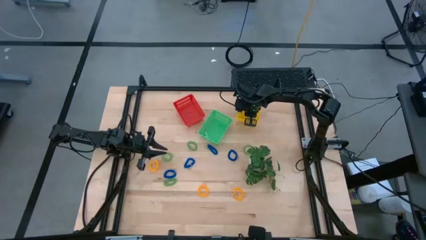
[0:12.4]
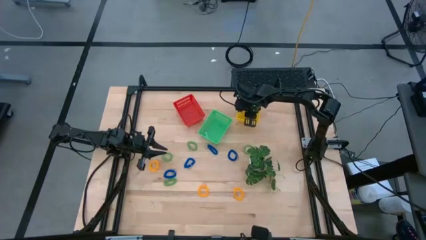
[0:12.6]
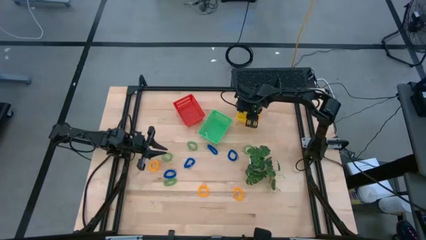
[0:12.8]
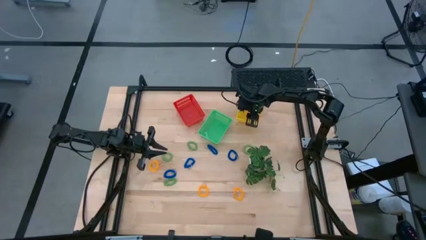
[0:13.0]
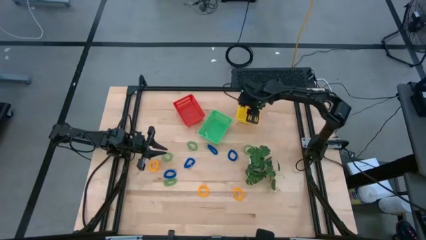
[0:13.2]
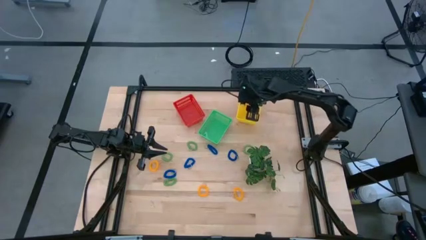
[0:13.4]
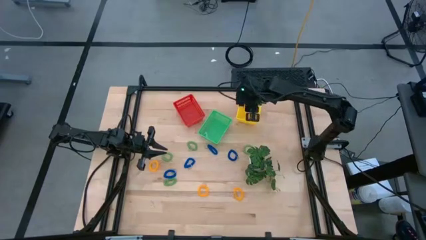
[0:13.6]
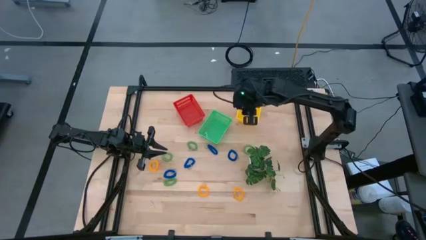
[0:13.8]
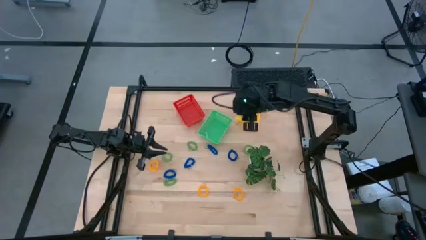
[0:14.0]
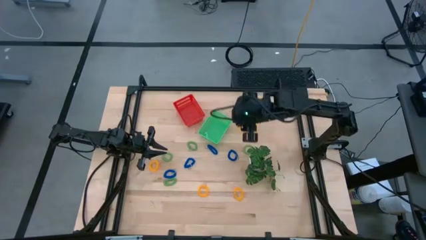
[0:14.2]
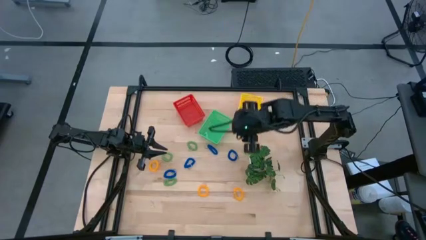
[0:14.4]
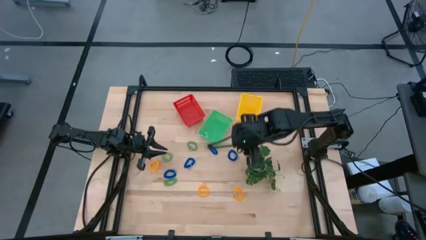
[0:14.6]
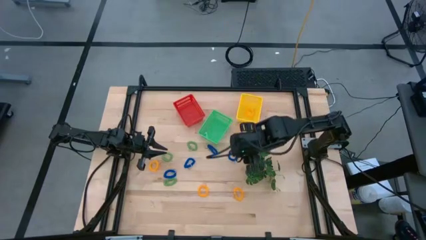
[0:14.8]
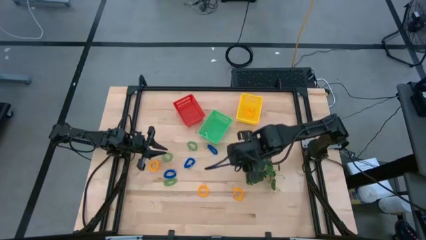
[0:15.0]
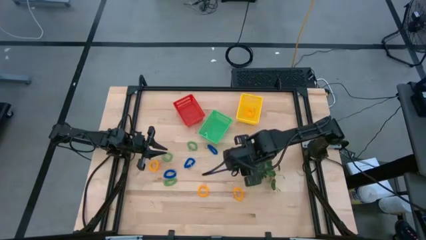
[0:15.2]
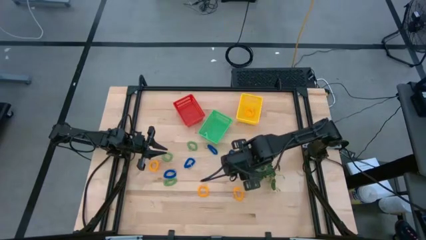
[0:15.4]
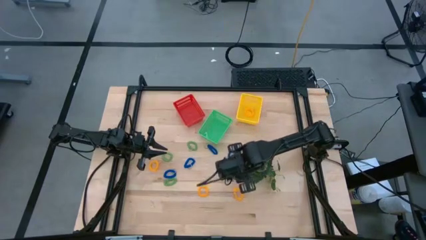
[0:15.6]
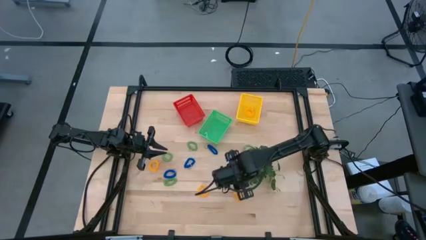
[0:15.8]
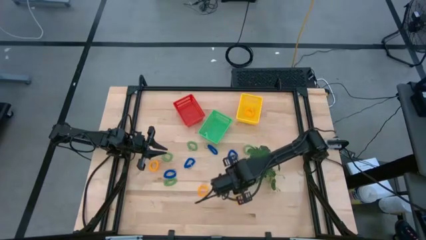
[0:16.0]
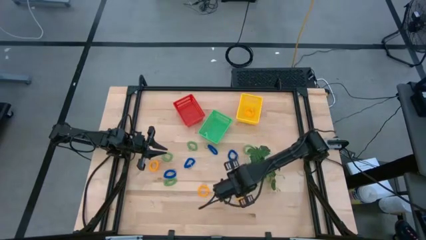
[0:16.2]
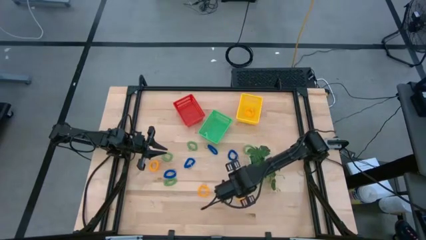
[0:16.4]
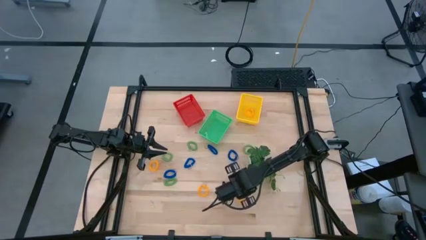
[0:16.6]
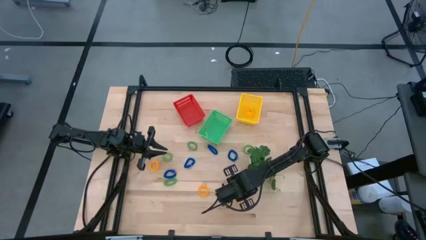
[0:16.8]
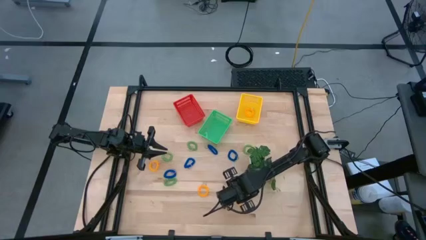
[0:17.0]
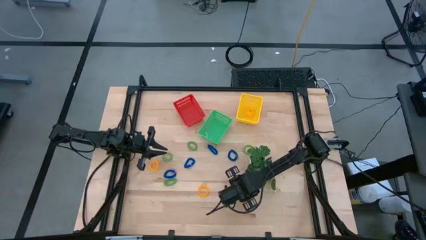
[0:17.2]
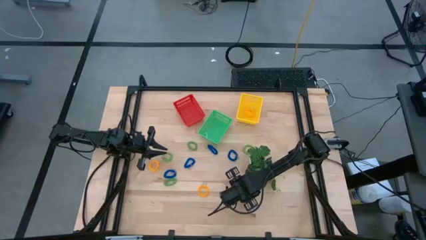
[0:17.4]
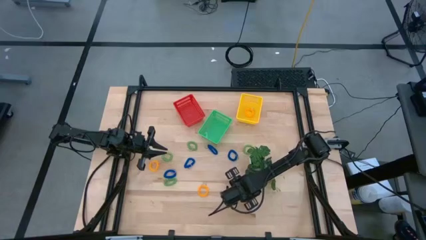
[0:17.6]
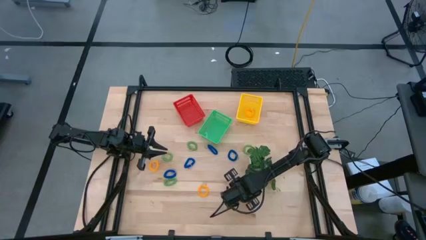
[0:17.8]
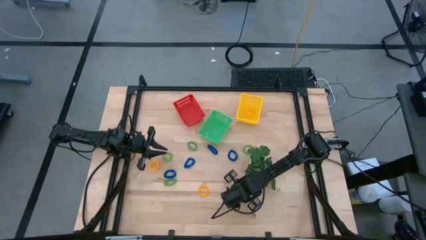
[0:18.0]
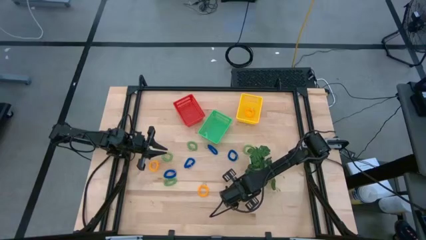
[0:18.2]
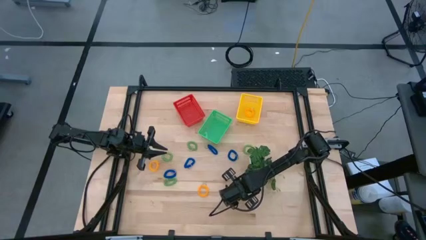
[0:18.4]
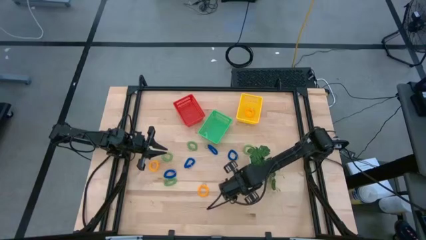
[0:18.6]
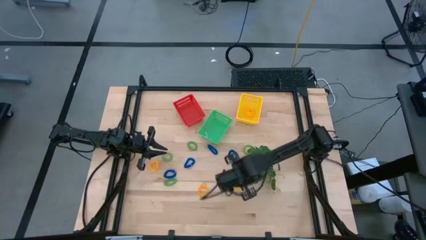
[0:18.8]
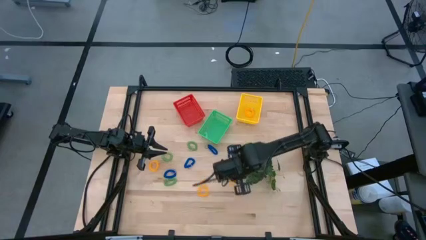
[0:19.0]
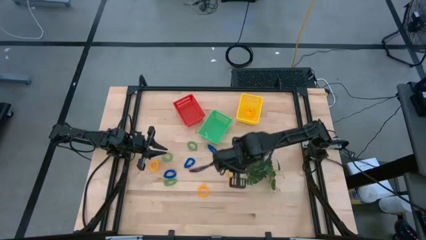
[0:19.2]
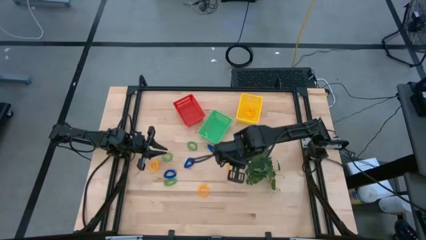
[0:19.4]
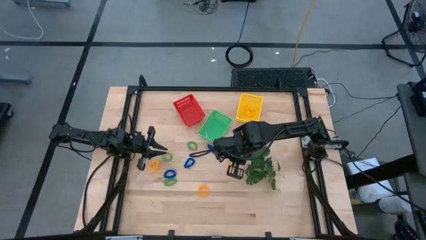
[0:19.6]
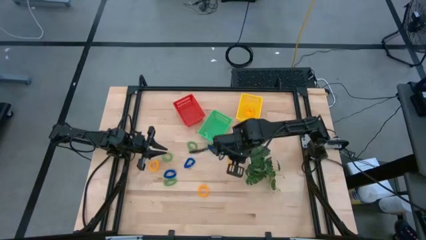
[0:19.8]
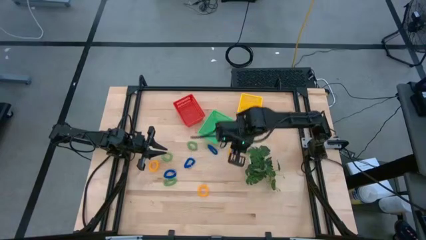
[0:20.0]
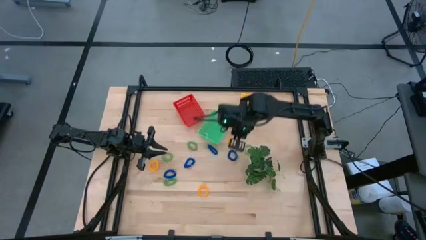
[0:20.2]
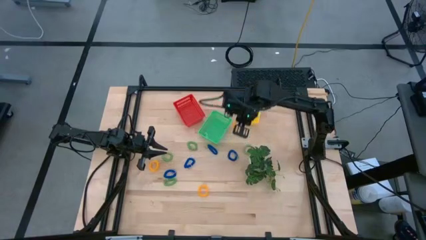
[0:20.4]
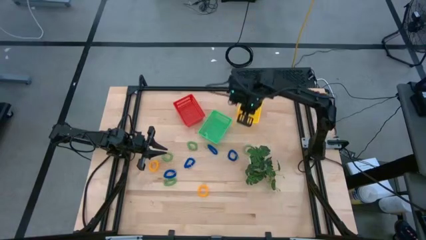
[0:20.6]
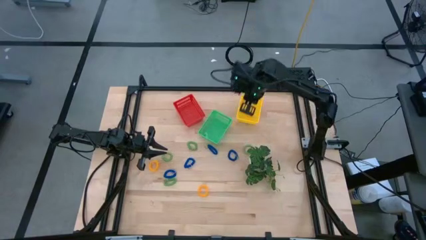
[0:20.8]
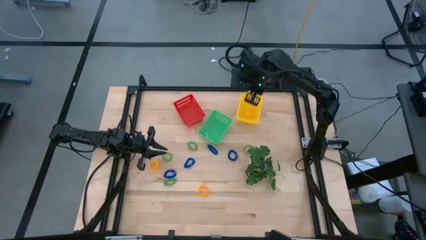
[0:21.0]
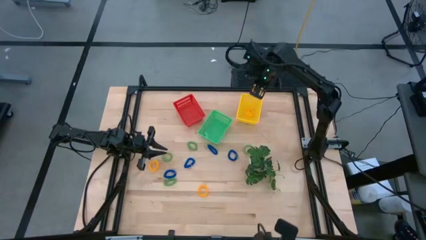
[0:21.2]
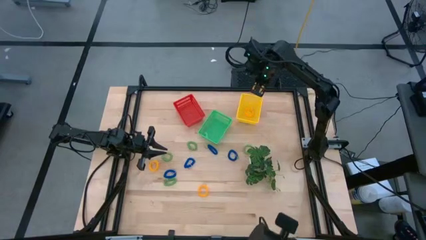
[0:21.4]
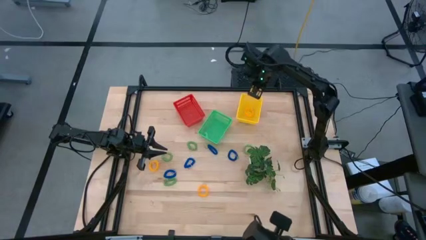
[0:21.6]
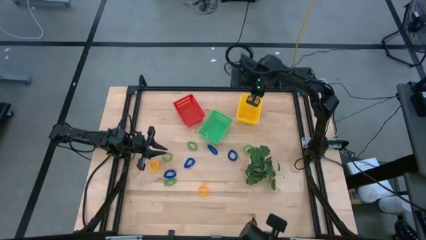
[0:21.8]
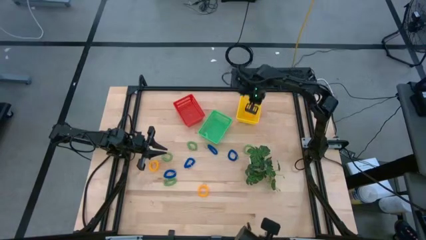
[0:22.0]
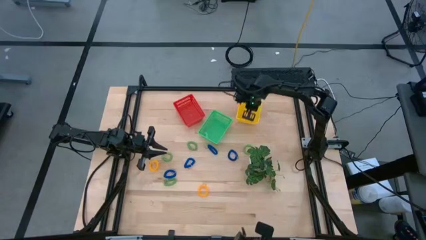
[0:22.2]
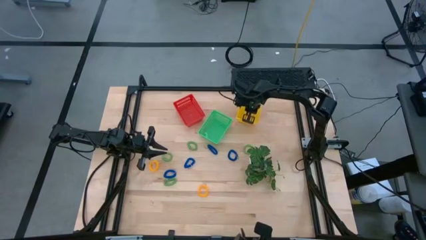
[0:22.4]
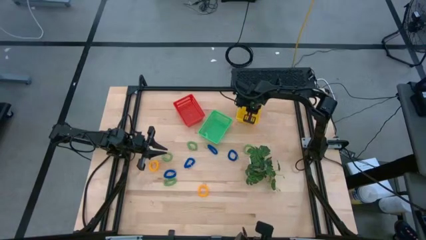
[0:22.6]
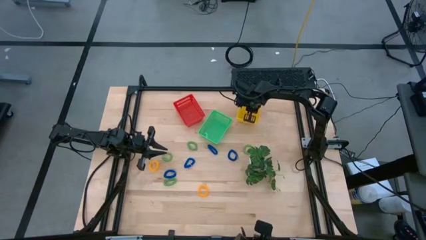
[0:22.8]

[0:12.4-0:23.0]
Task: Sort spring keychains
Put the yellow spring keychain into the yellow bin
